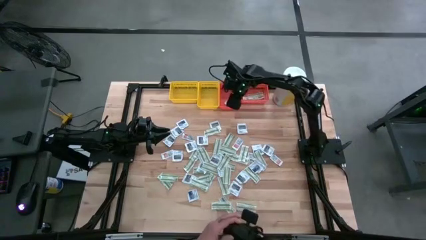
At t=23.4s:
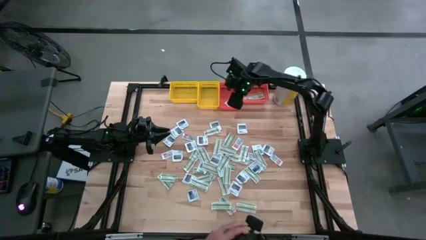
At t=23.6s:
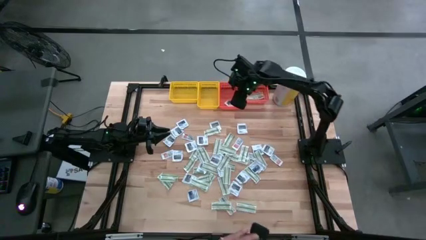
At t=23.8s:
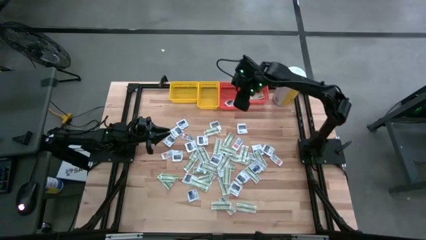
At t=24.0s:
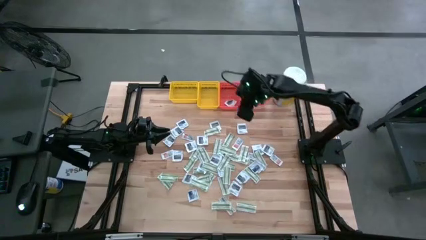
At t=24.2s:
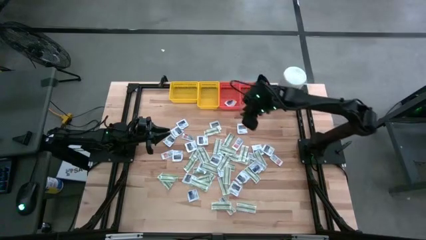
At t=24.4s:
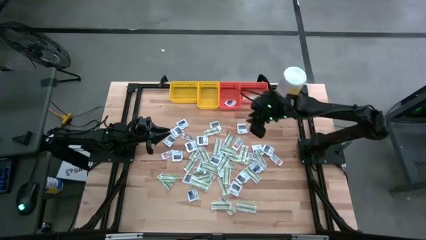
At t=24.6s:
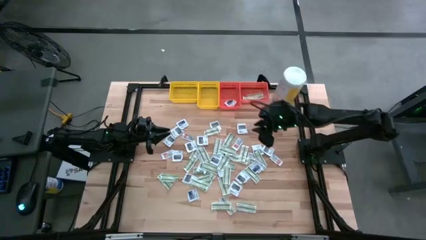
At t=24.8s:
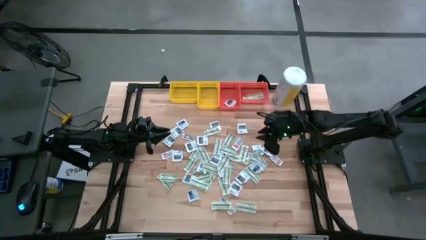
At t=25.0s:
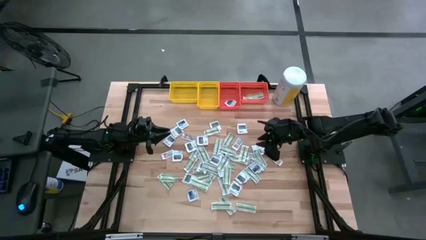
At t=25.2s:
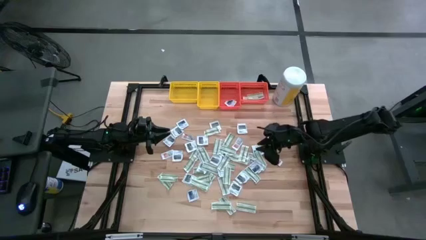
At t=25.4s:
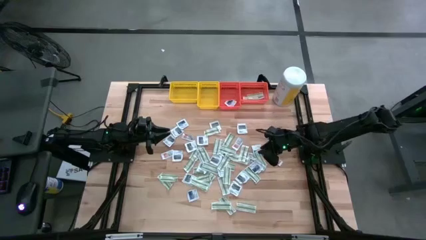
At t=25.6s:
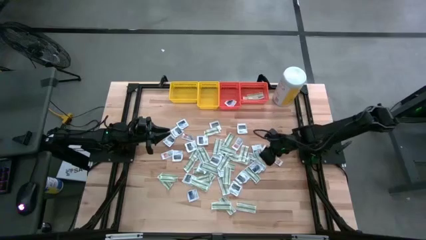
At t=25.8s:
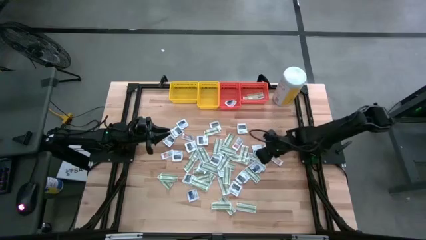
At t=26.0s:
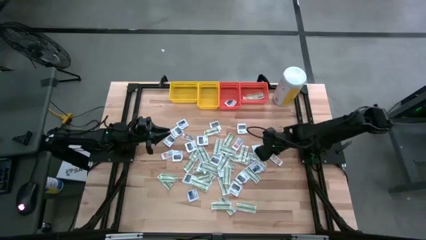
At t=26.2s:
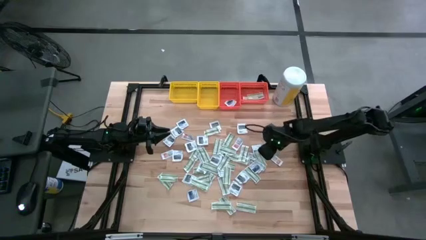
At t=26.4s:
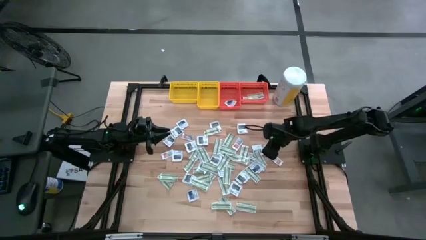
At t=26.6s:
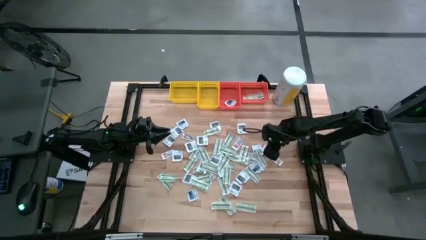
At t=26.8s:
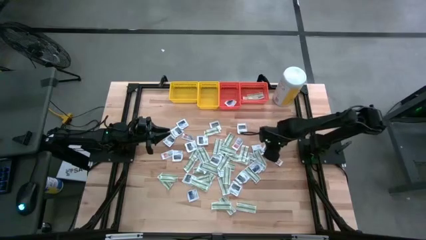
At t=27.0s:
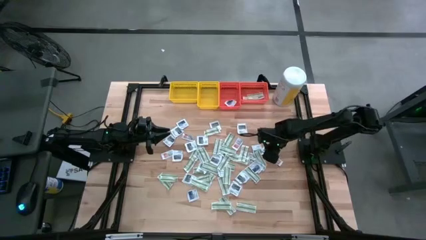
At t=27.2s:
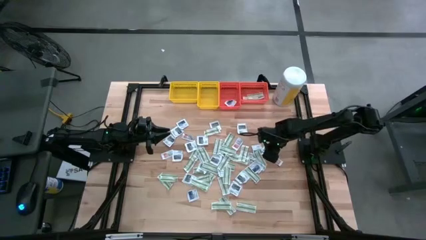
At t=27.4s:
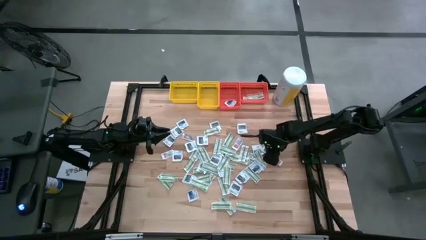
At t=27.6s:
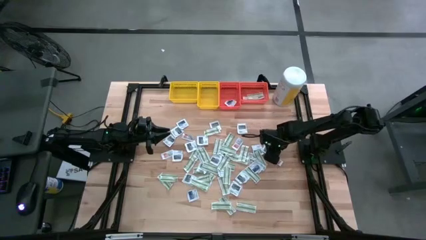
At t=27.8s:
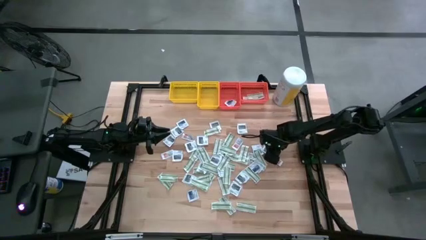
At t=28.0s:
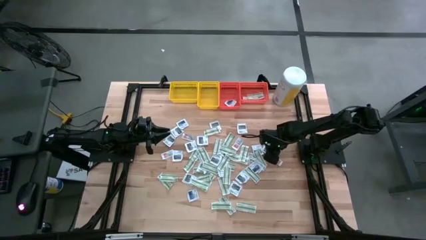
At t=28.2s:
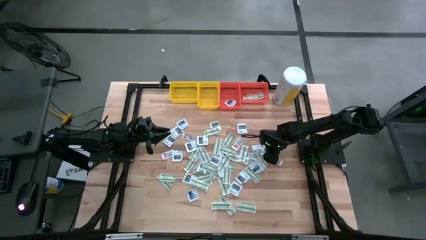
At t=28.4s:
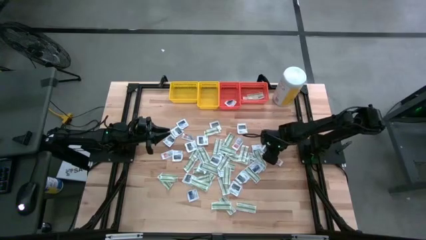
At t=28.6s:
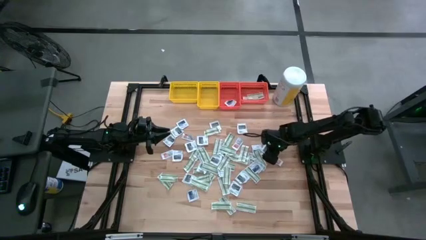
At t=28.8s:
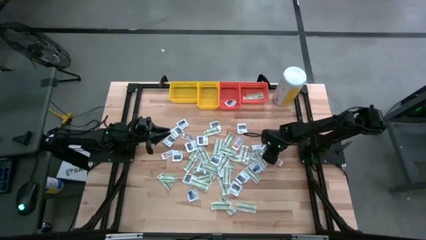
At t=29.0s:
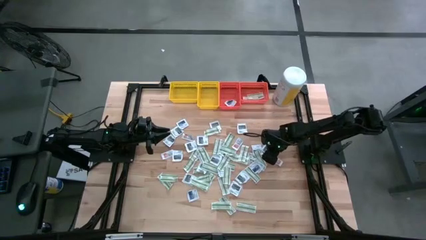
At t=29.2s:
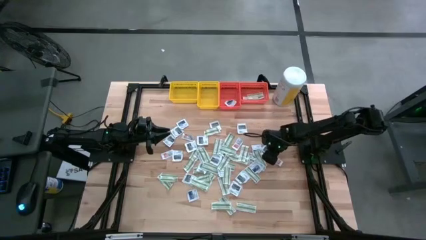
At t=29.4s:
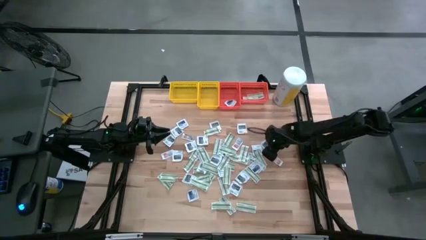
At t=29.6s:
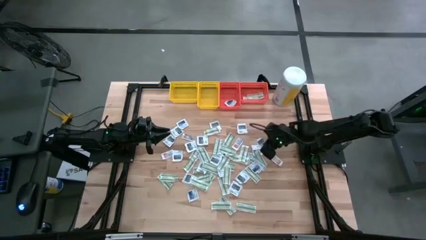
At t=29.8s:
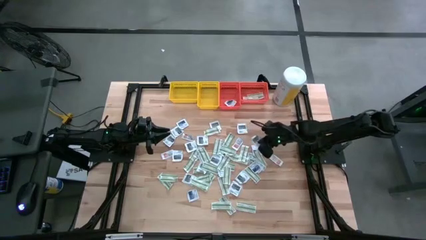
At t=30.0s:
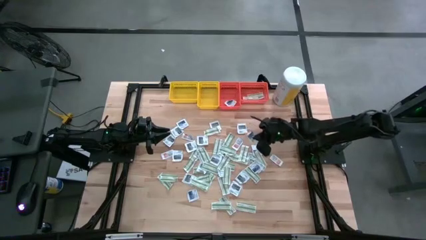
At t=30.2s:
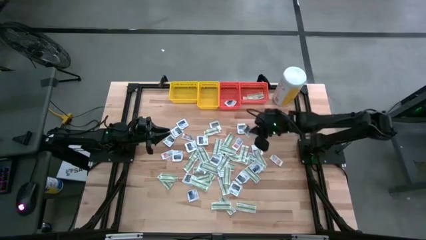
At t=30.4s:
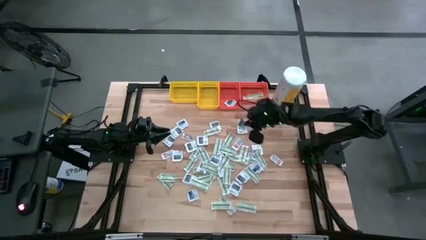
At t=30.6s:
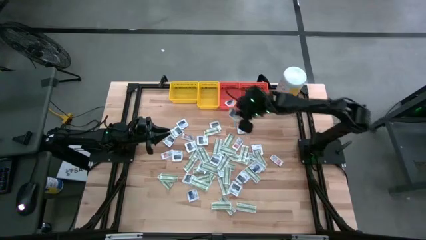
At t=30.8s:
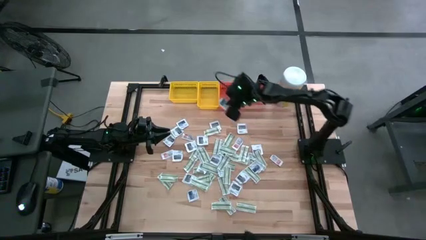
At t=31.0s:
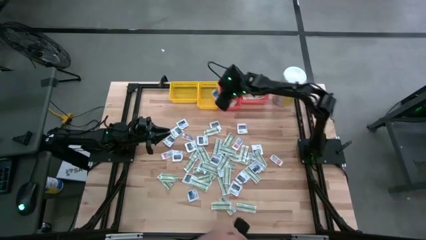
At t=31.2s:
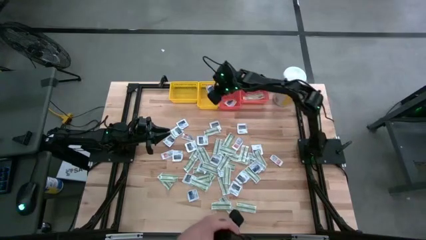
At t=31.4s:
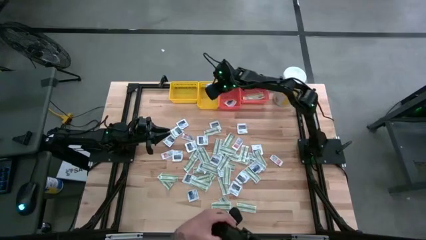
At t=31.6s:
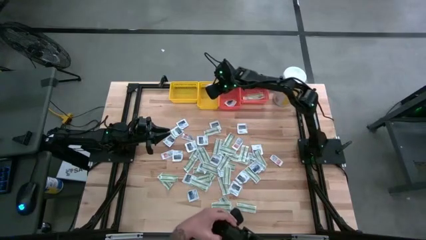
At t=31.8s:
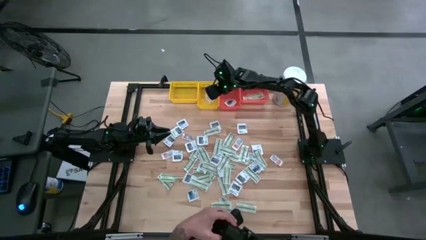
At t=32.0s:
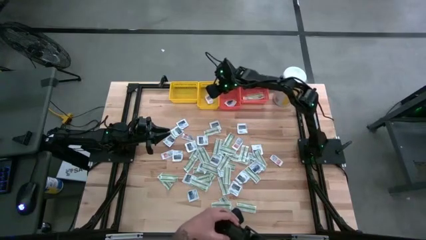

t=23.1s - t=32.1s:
Task: Pick & Place First Aid Supplies
Put the gray packet into the right yellow bin

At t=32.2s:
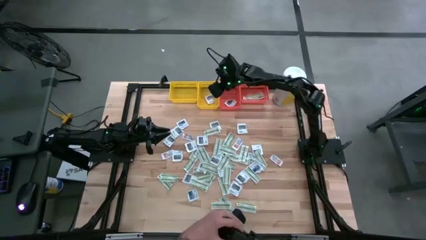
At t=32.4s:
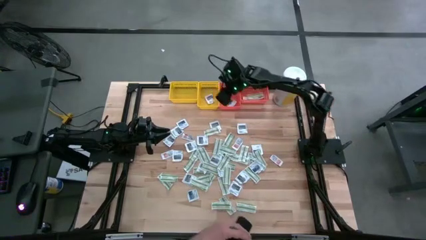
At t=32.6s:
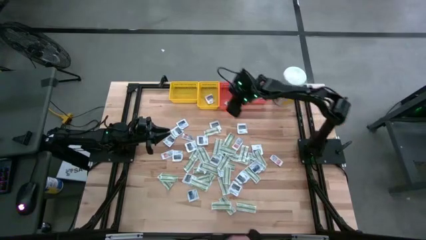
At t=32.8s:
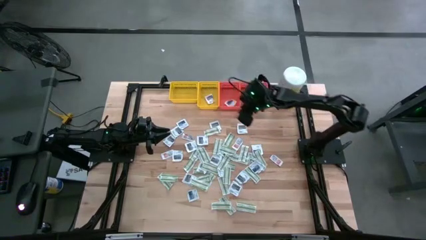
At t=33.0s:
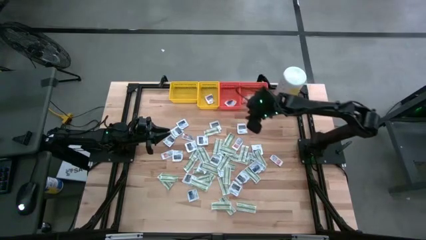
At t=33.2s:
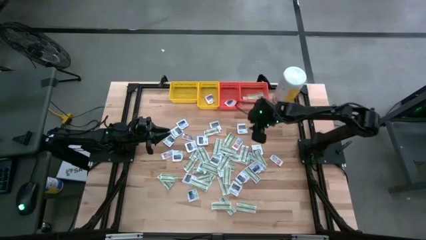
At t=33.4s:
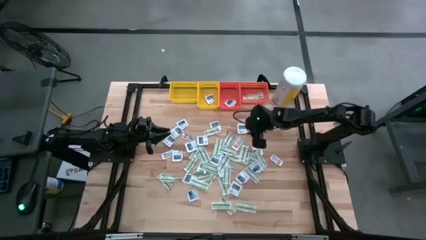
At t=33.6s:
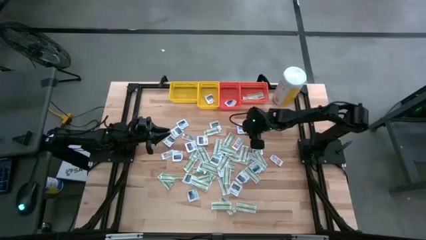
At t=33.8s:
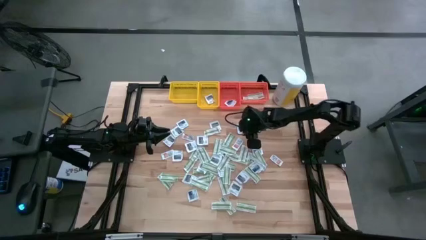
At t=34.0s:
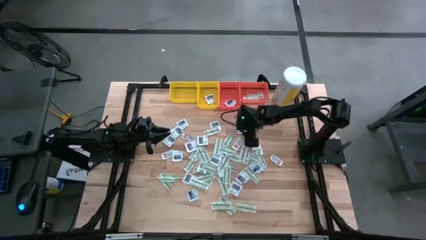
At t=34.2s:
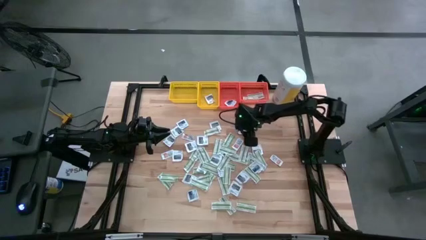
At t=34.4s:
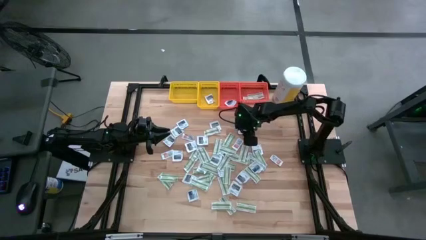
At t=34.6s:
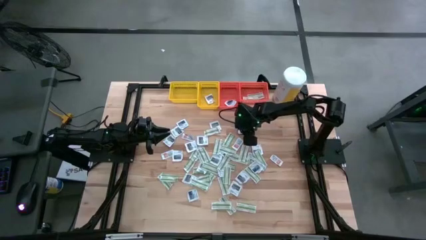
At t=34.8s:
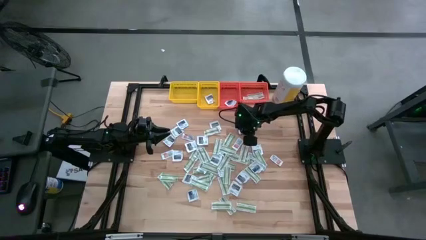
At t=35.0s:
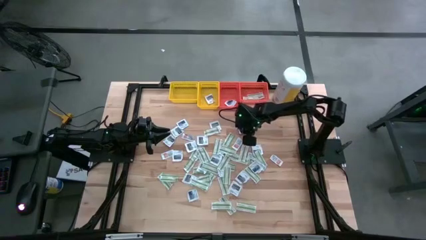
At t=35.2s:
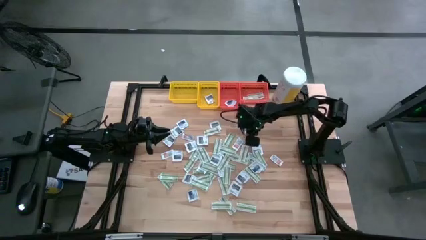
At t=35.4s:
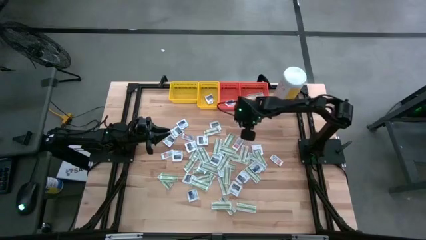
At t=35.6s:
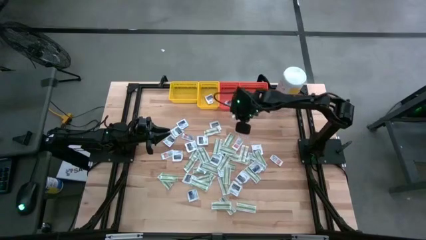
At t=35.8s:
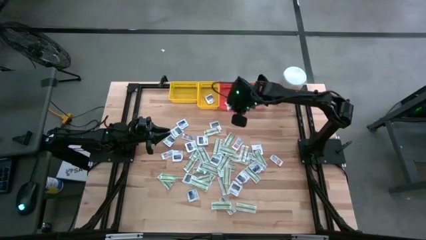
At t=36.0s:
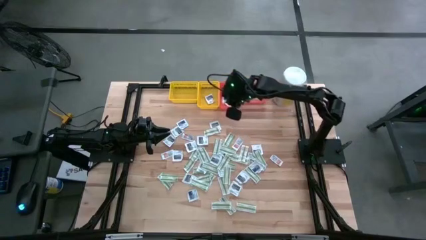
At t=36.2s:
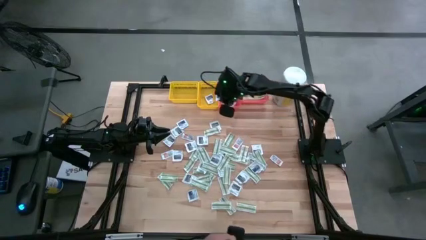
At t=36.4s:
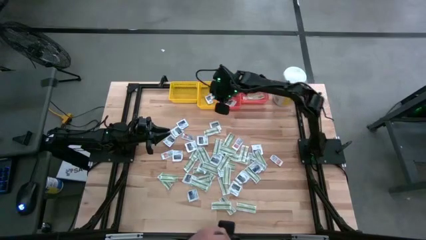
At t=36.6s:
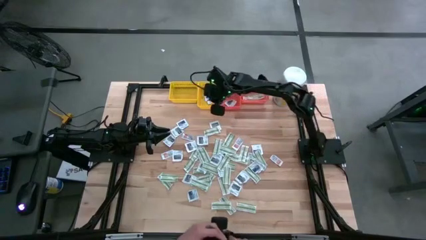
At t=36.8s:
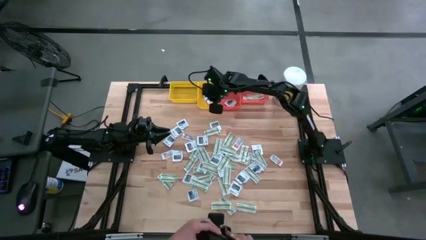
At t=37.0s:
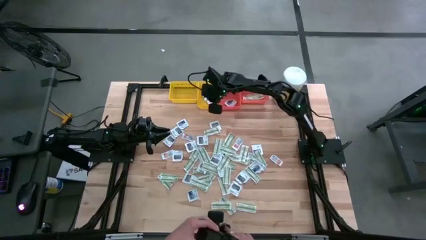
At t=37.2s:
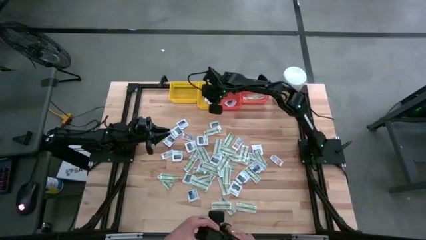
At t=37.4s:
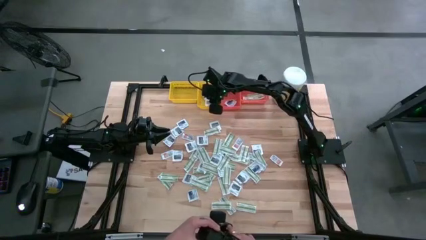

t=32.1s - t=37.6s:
Put the gray packet into the right yellow bin

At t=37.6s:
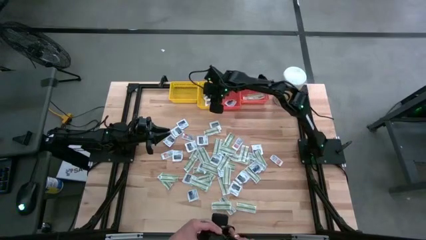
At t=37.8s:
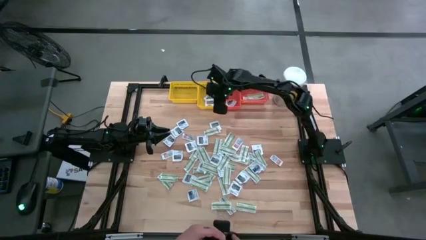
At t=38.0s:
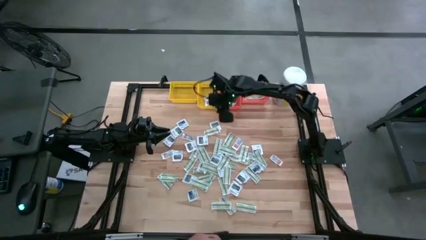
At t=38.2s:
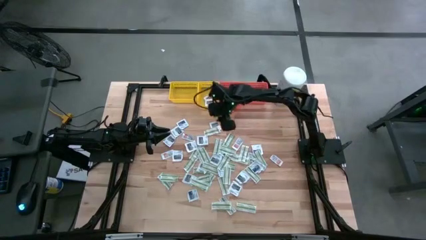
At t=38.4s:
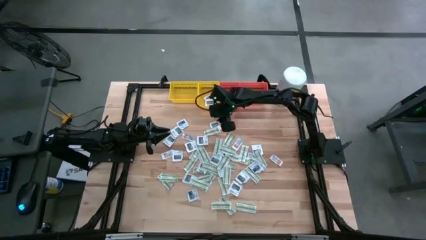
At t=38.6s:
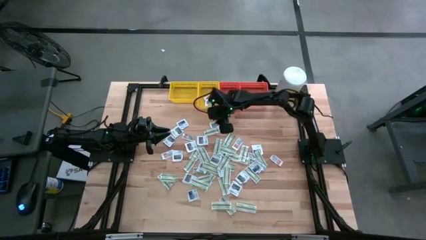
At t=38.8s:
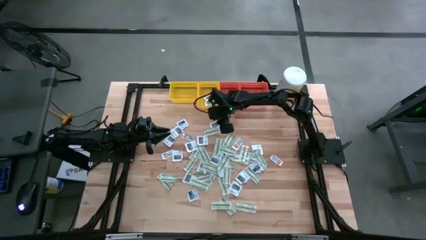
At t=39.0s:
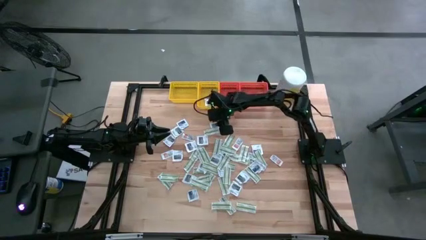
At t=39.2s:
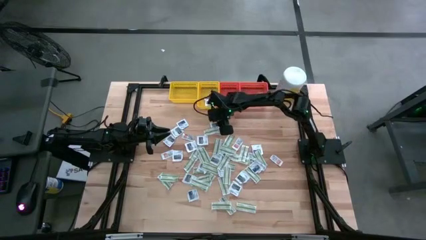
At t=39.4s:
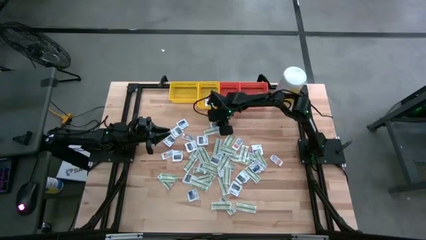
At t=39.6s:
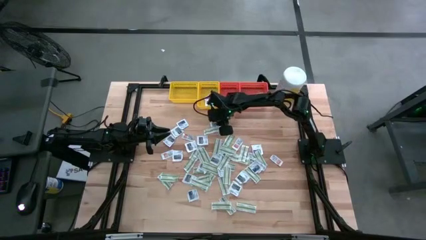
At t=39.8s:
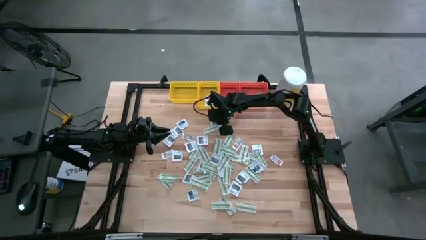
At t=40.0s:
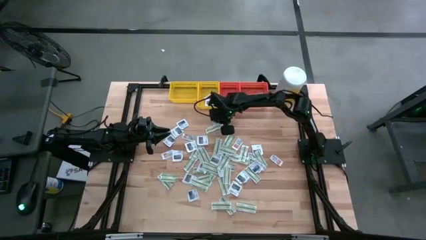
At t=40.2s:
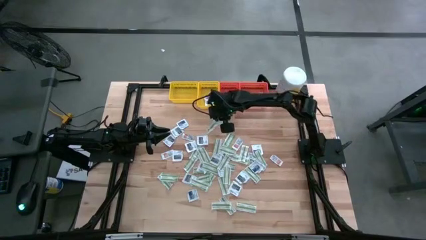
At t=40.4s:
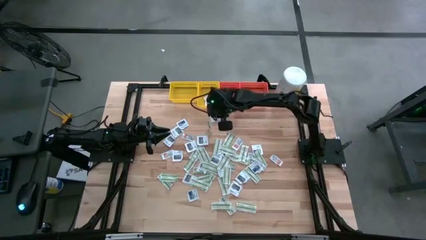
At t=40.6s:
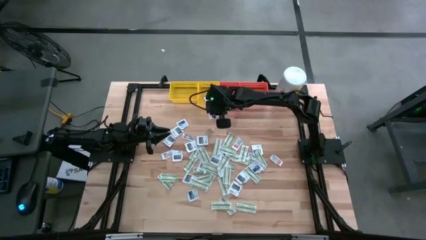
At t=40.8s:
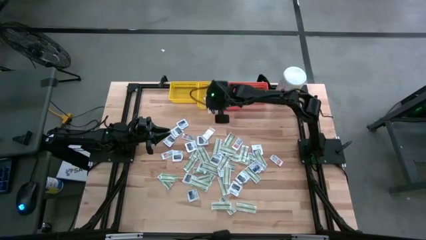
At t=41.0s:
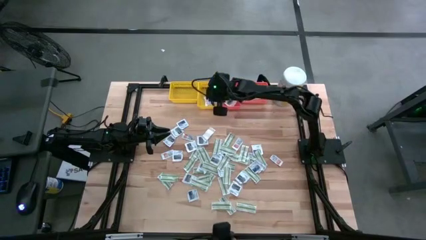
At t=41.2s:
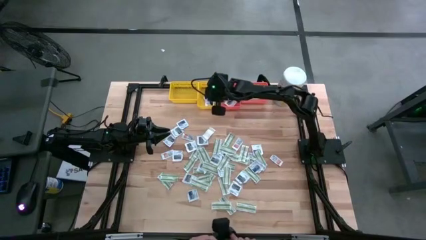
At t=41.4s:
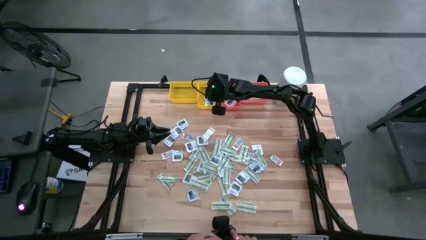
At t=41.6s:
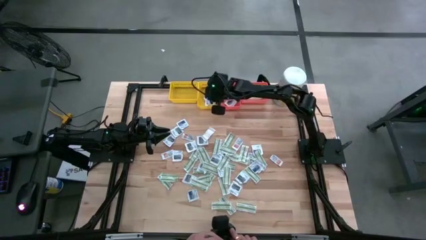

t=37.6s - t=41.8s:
Put the gray packet into the right yellow bin
